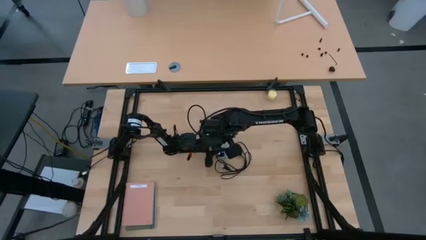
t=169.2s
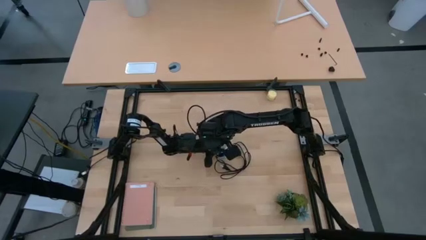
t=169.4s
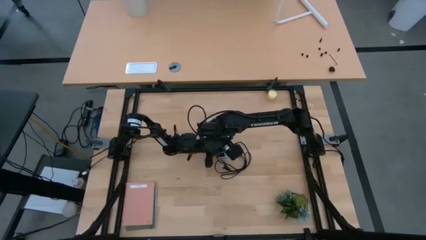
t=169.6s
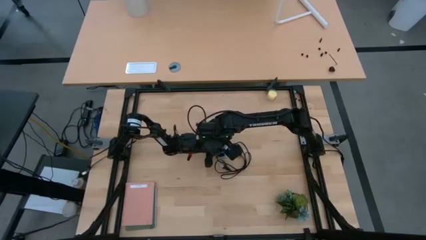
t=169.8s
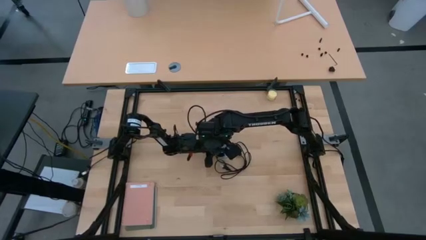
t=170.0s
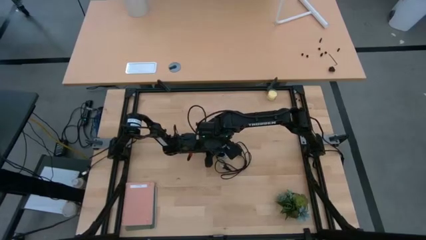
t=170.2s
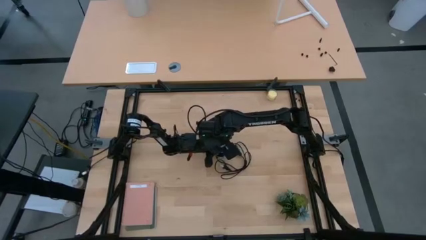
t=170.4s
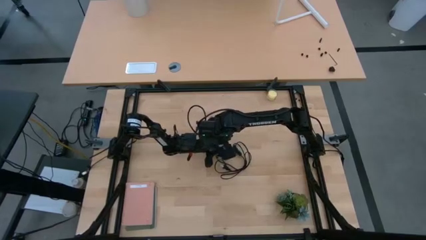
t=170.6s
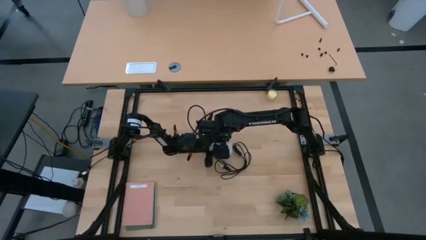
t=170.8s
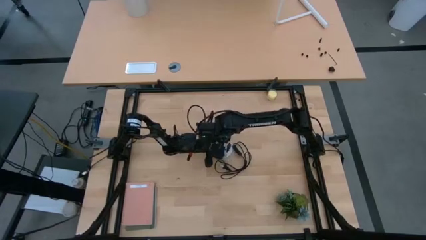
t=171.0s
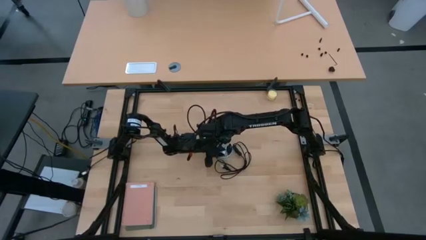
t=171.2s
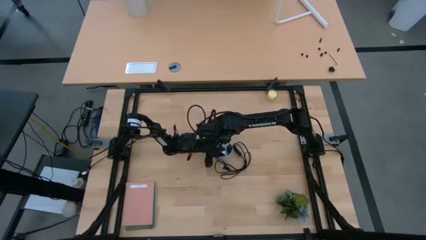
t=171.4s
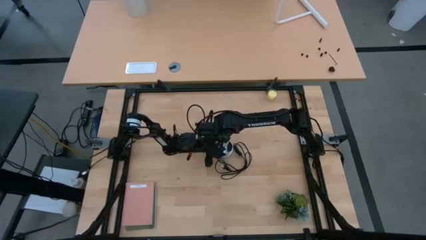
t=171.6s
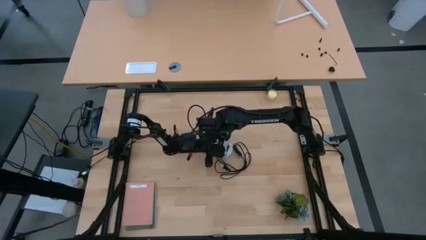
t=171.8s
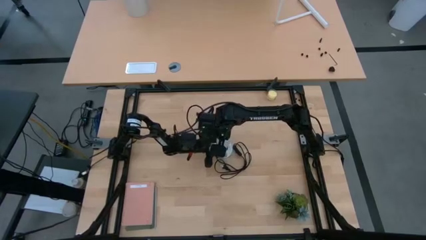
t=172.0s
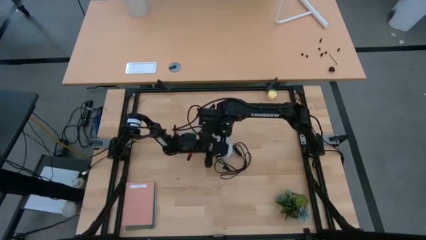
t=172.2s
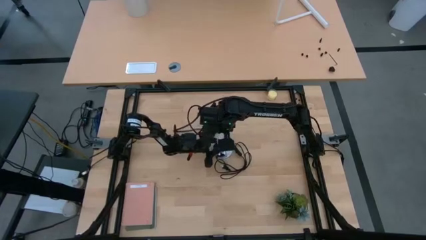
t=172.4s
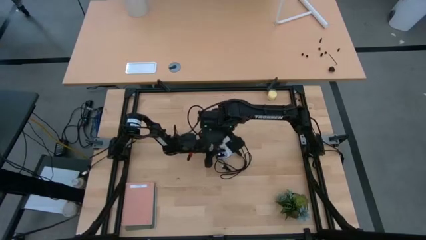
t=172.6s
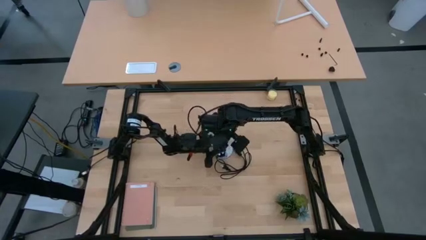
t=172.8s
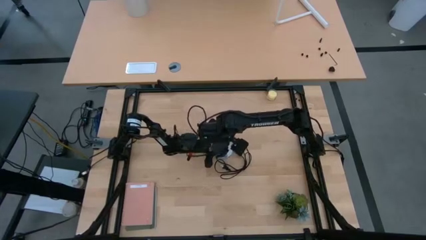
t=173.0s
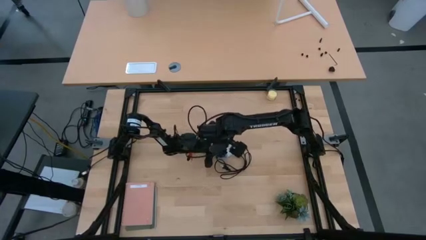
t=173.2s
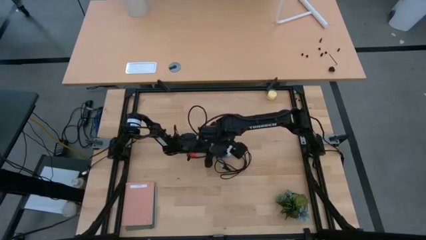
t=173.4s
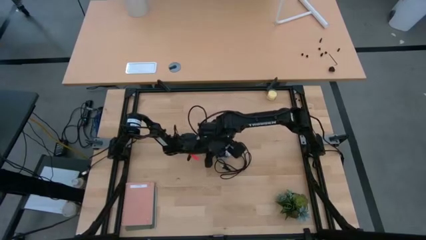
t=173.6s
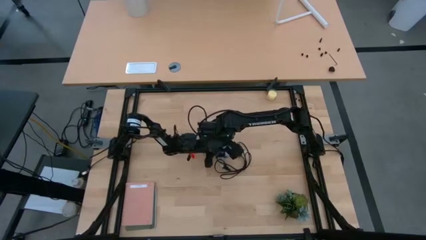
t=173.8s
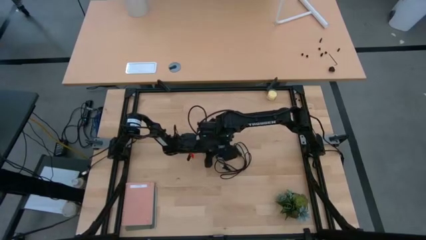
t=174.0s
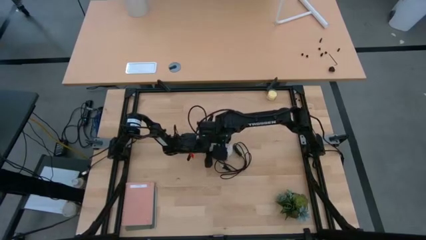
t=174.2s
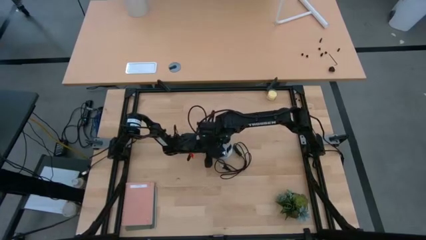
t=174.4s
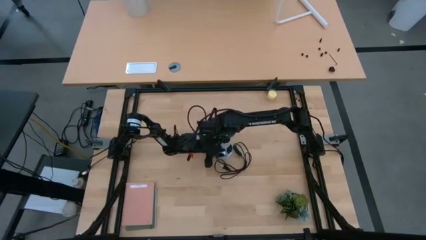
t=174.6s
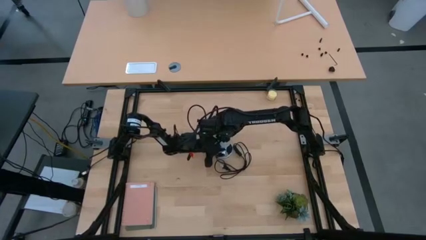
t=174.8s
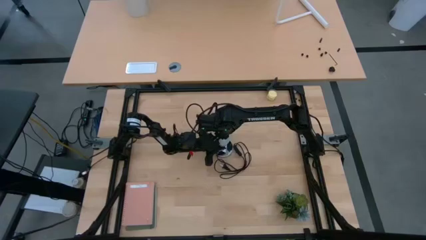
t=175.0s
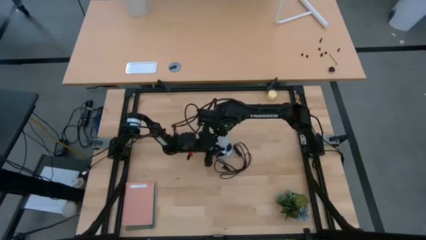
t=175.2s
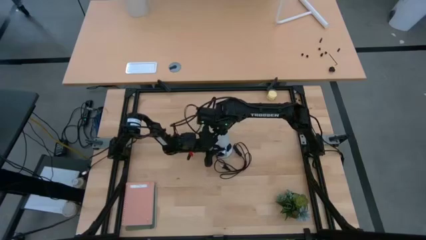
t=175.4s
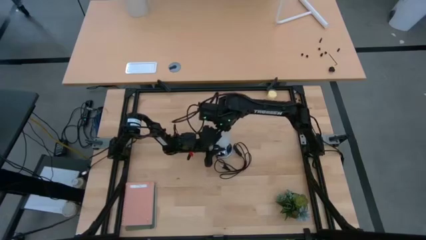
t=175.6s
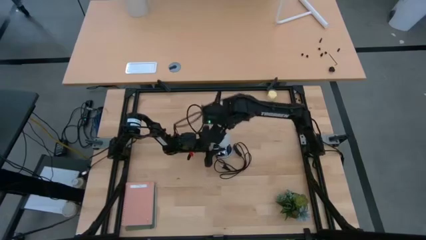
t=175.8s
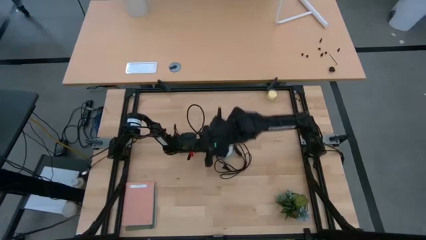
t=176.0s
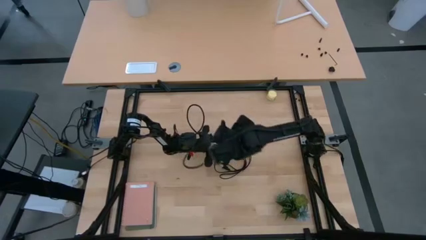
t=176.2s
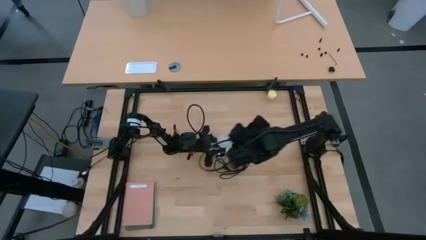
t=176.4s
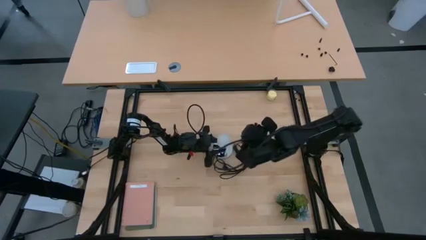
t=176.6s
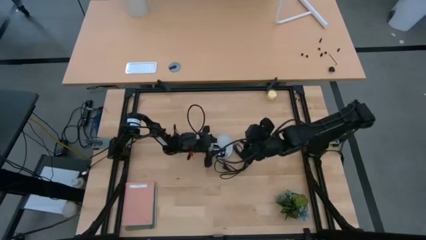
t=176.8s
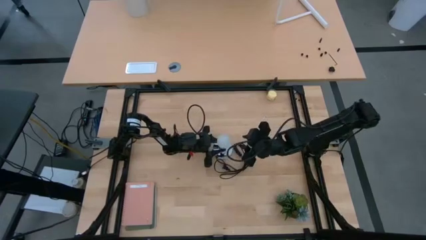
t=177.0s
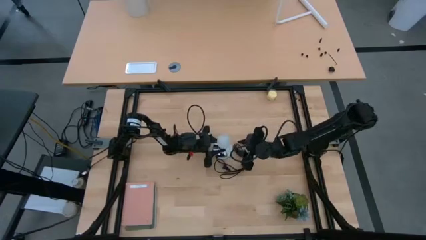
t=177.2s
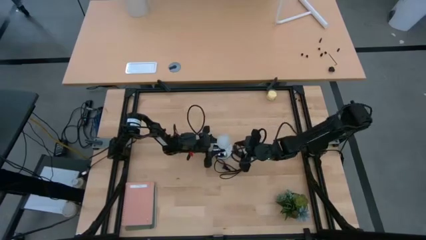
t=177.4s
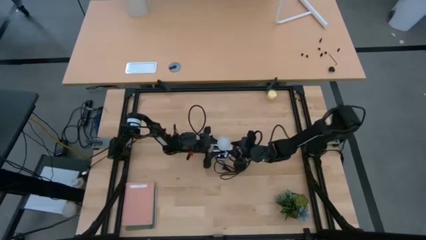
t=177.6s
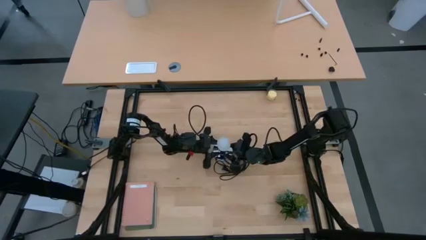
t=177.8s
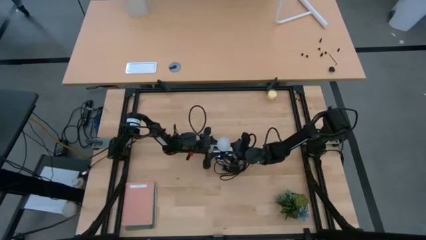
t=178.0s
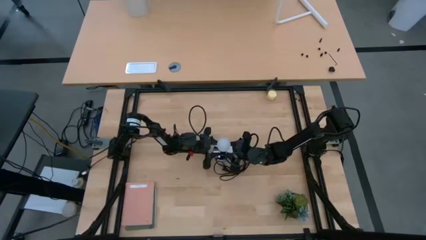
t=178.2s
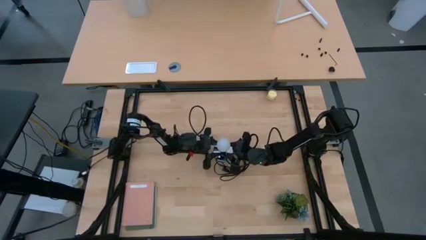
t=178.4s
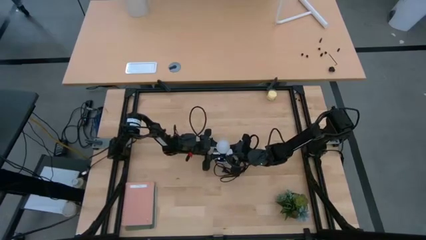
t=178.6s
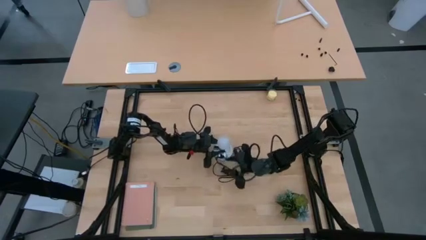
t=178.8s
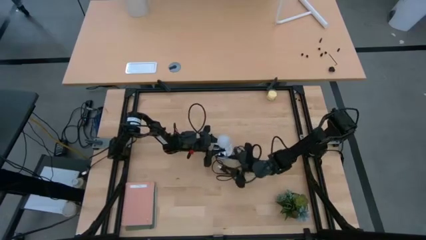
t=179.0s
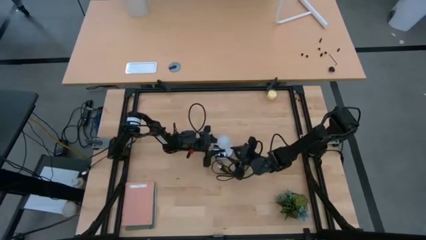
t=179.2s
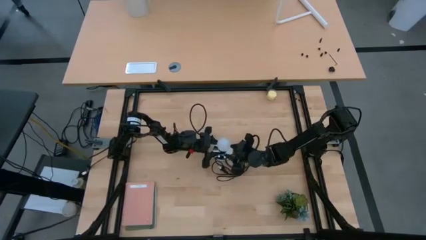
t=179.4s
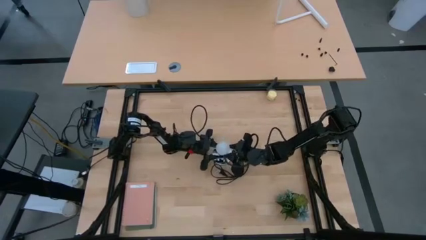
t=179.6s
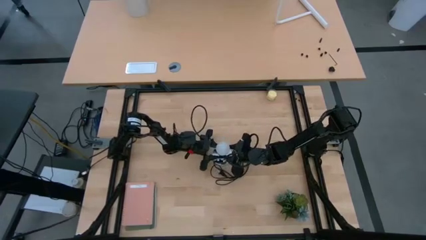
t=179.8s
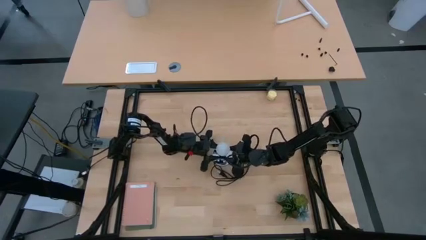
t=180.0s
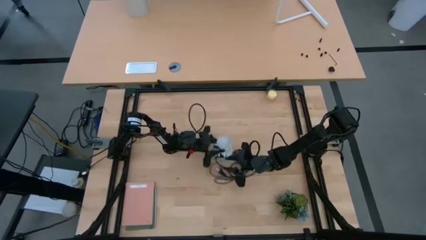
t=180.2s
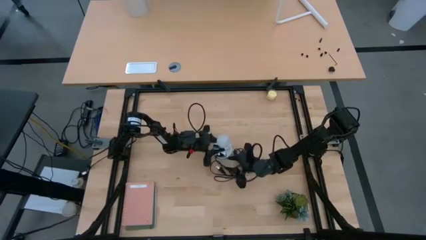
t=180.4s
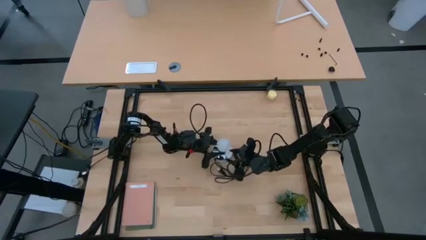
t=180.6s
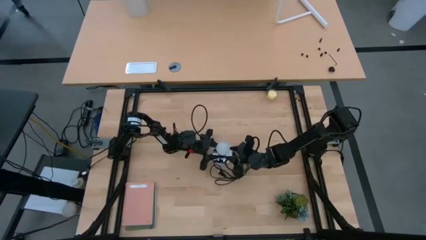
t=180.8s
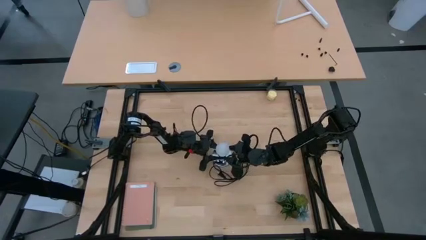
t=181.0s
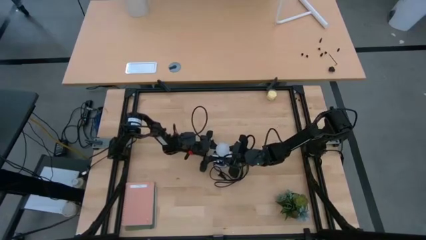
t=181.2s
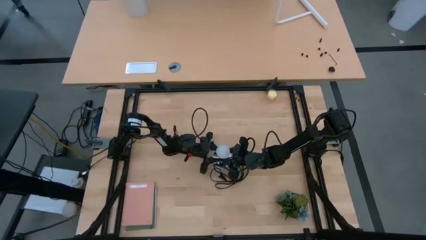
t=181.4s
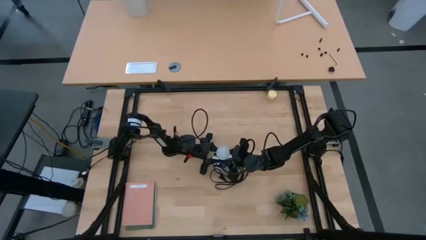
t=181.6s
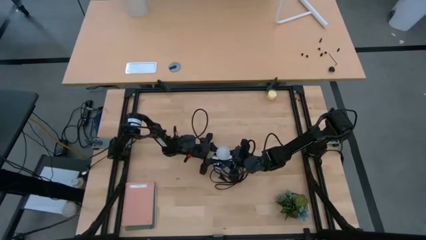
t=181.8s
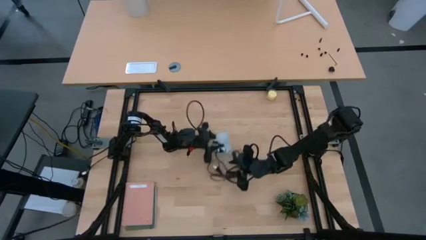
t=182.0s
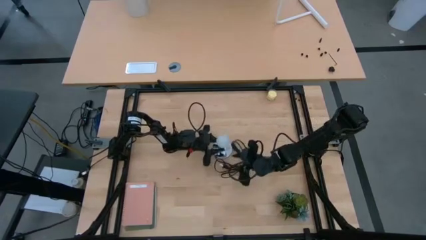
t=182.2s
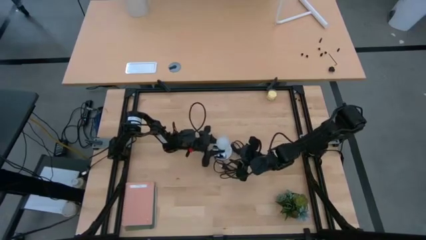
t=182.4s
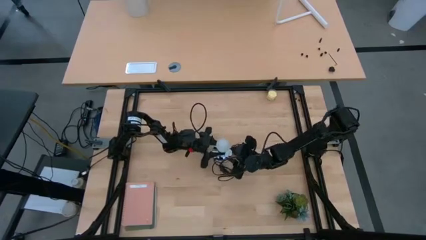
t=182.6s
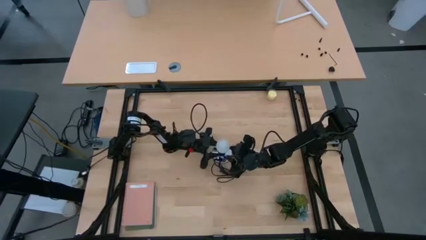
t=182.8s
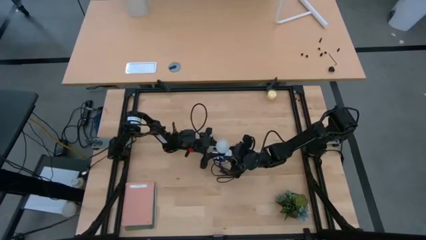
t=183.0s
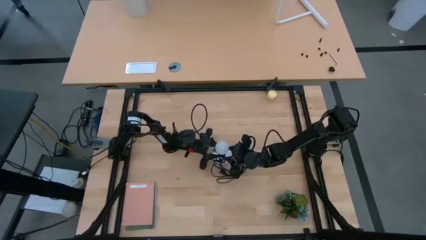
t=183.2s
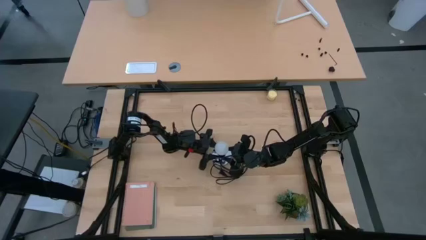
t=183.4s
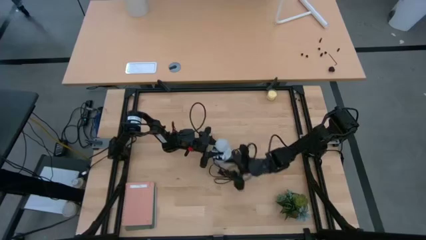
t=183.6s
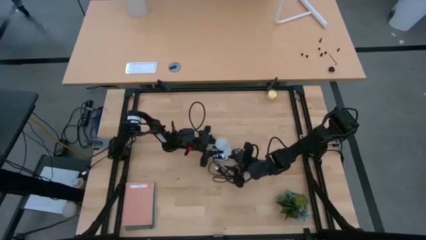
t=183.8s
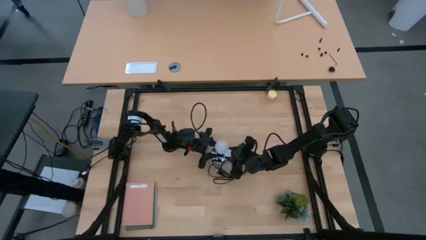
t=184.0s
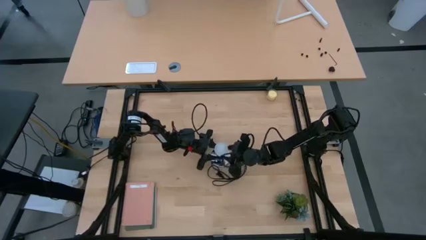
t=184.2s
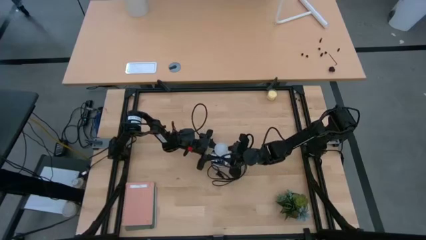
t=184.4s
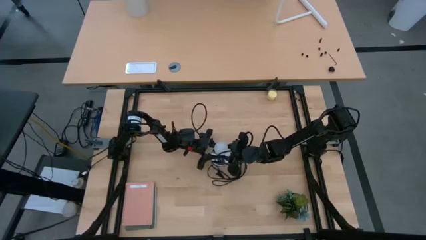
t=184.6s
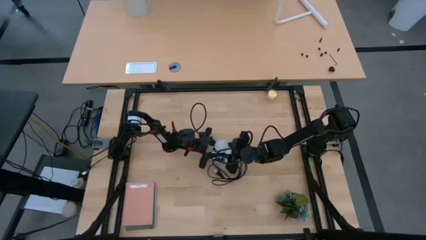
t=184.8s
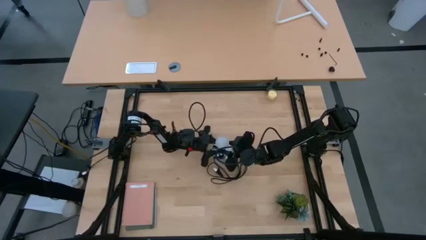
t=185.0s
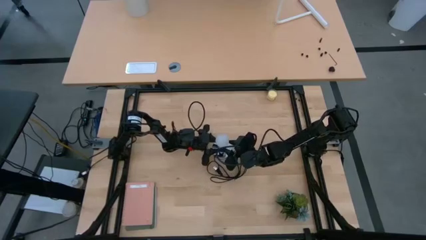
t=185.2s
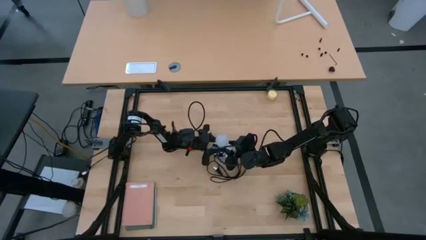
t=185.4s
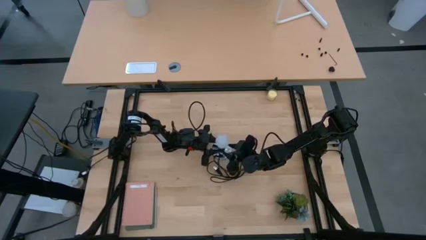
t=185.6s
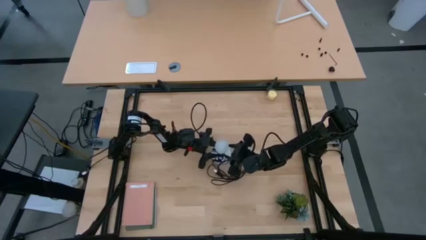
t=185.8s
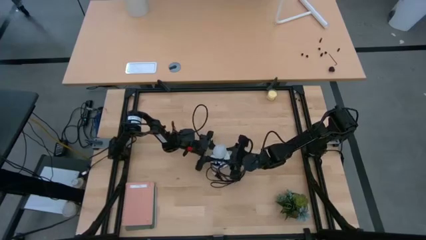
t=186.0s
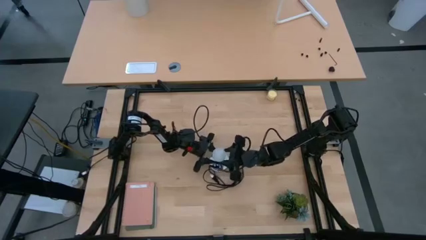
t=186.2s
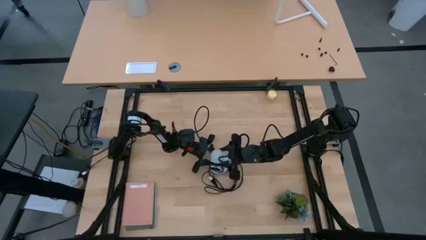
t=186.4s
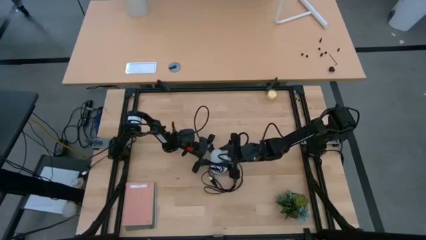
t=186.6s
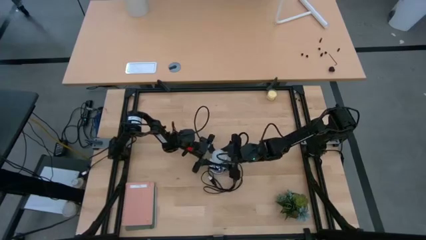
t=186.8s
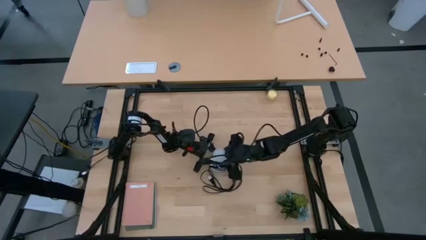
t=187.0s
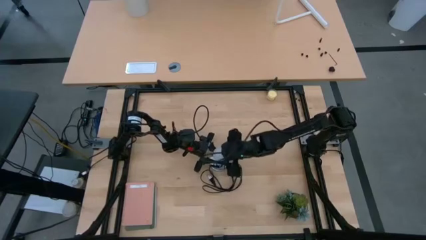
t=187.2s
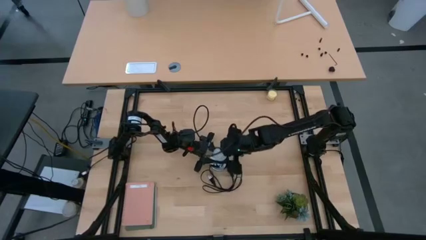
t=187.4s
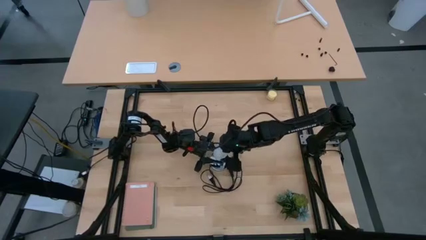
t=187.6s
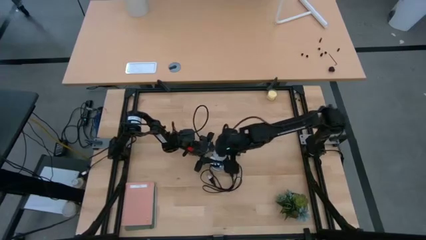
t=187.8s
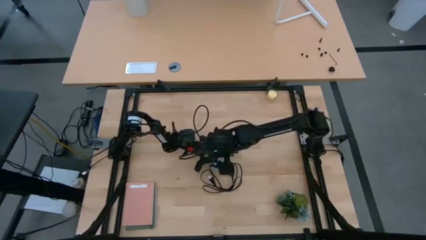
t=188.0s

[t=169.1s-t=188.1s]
Task: Screw lightbulb
Insert the white lightbulb into the silver lamp
